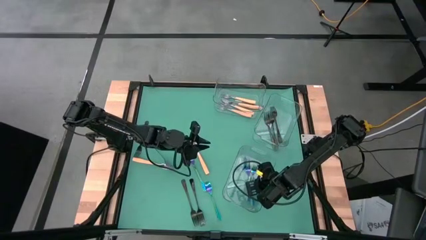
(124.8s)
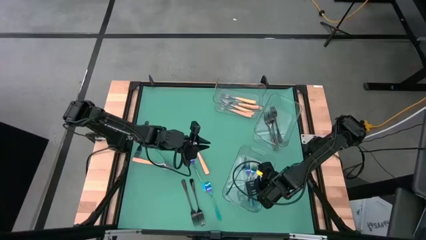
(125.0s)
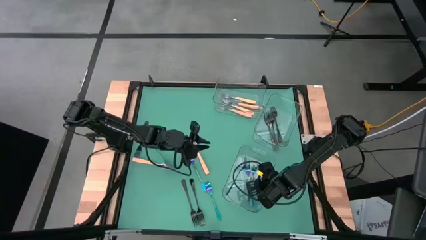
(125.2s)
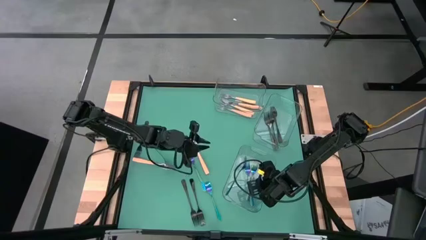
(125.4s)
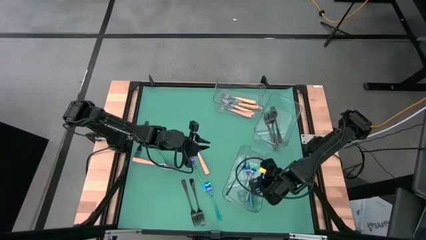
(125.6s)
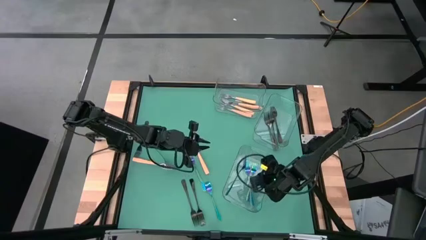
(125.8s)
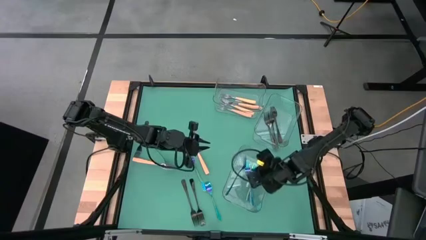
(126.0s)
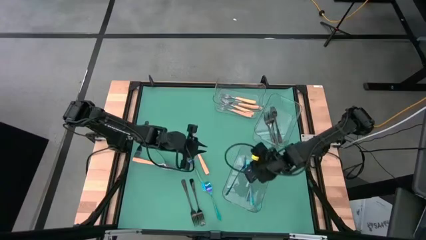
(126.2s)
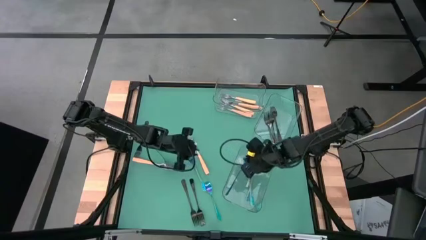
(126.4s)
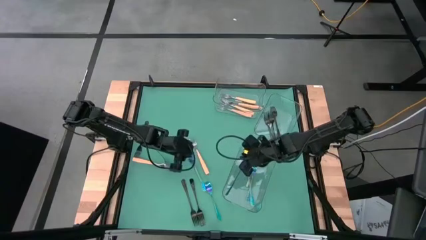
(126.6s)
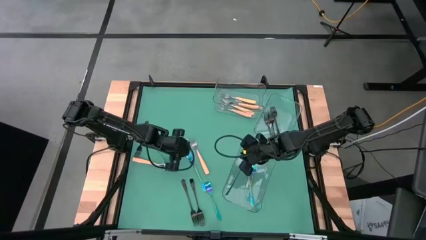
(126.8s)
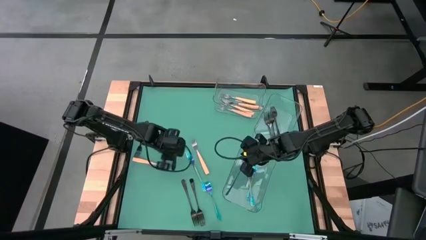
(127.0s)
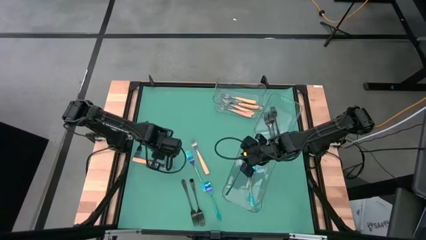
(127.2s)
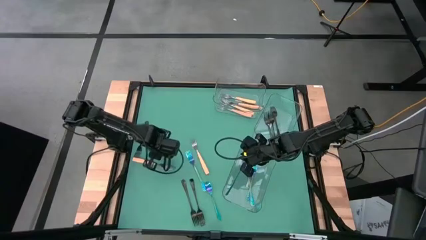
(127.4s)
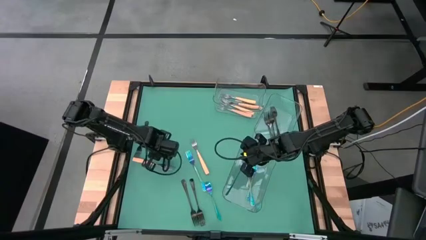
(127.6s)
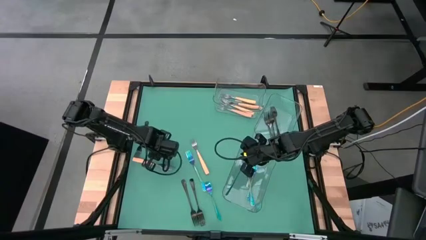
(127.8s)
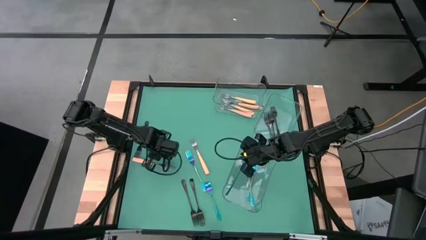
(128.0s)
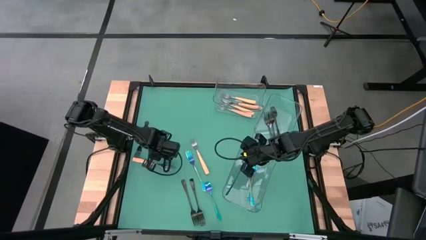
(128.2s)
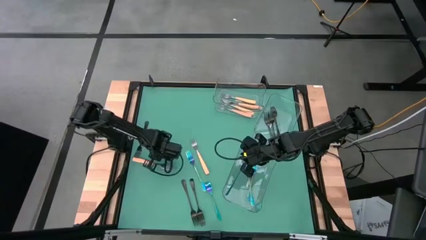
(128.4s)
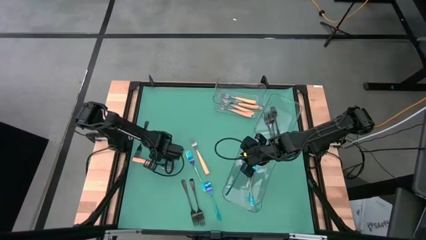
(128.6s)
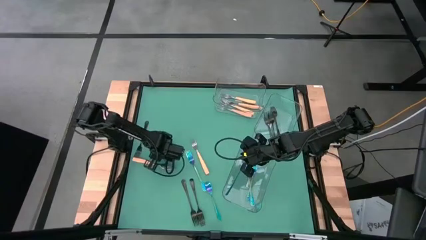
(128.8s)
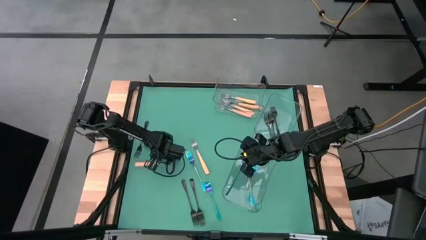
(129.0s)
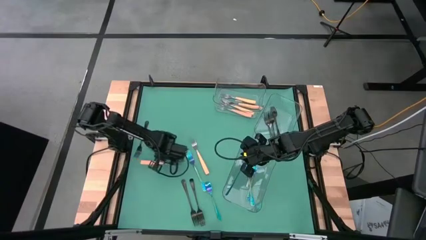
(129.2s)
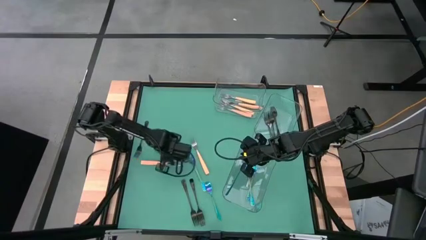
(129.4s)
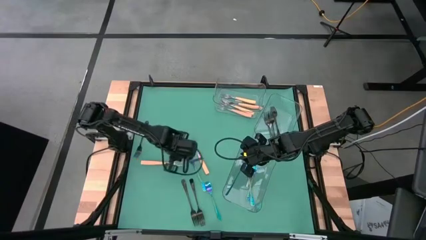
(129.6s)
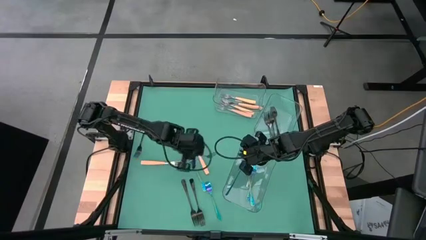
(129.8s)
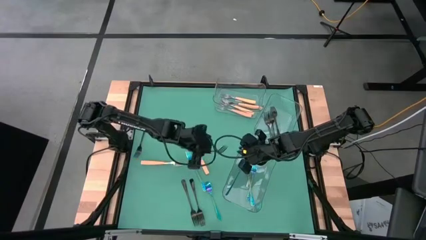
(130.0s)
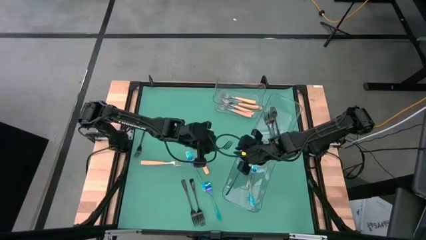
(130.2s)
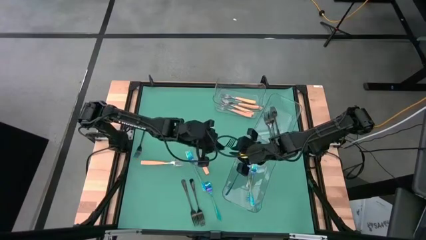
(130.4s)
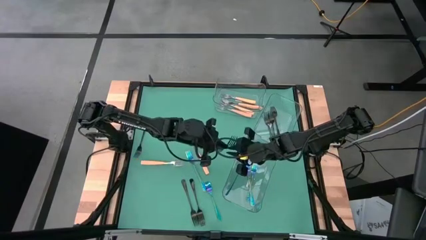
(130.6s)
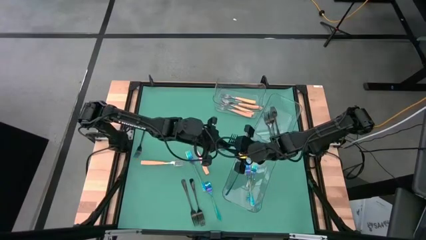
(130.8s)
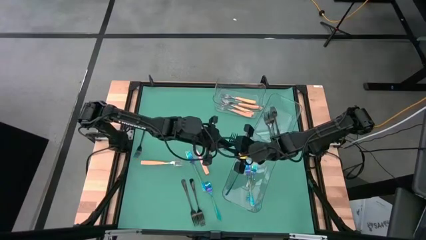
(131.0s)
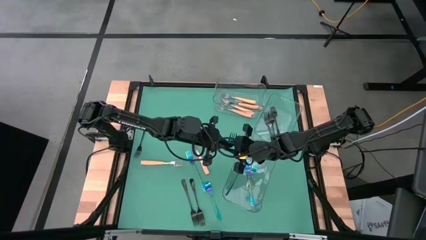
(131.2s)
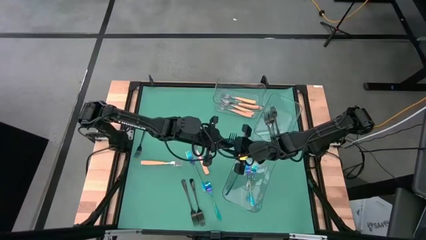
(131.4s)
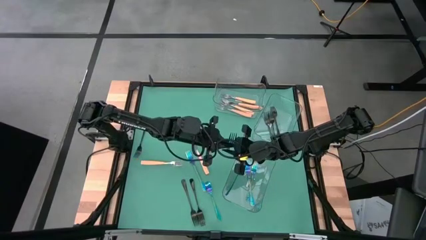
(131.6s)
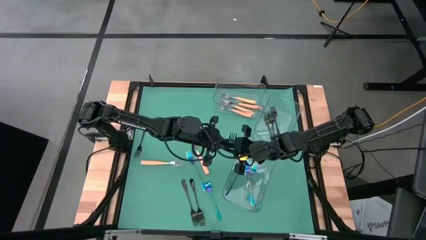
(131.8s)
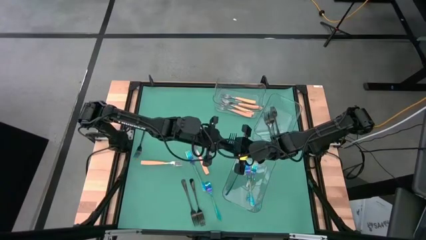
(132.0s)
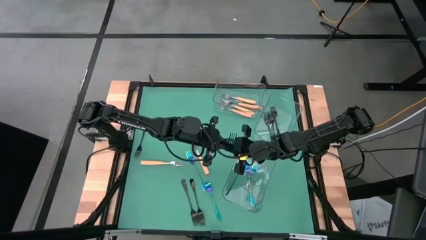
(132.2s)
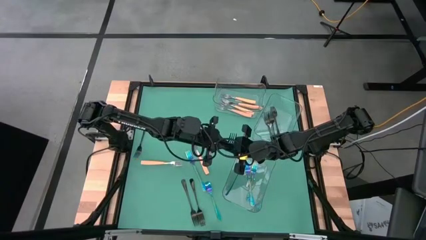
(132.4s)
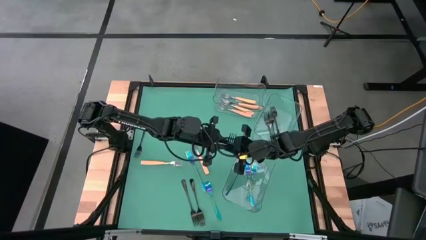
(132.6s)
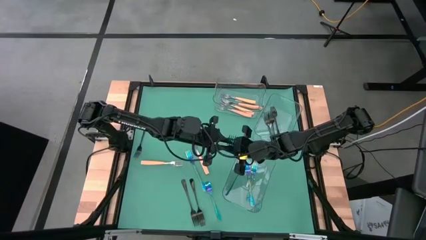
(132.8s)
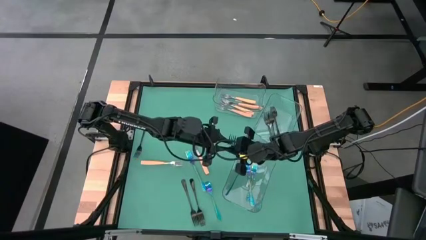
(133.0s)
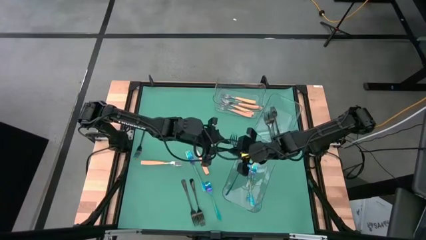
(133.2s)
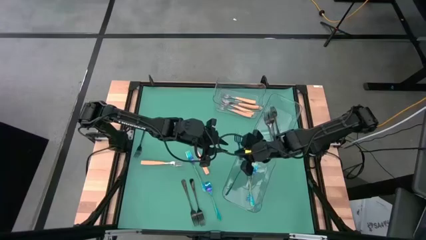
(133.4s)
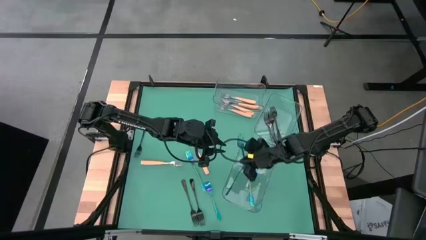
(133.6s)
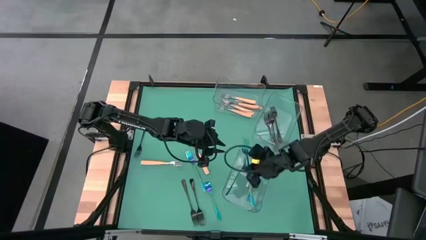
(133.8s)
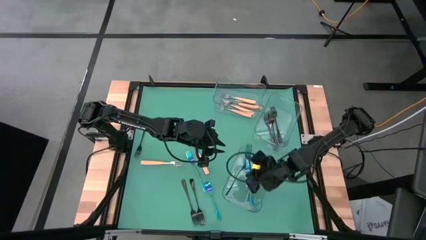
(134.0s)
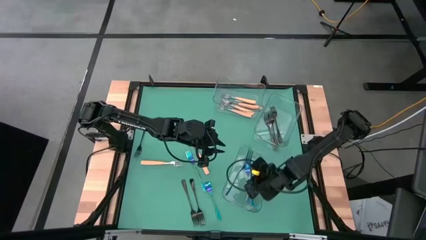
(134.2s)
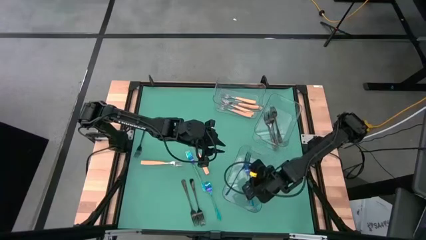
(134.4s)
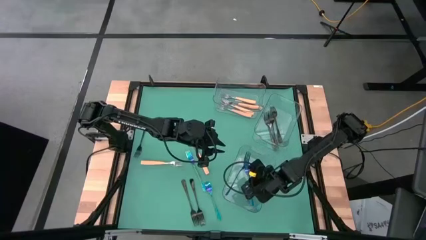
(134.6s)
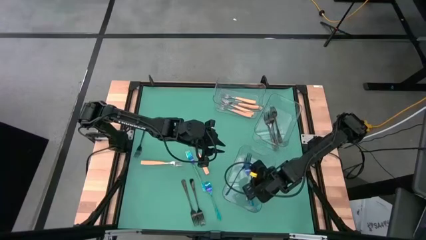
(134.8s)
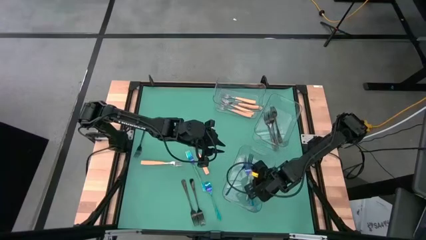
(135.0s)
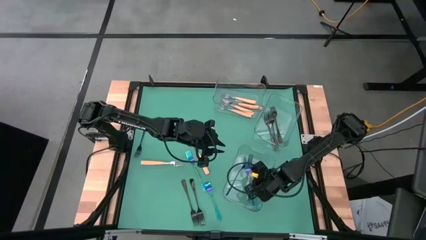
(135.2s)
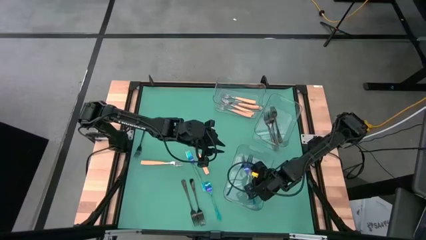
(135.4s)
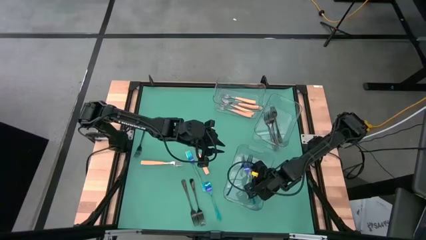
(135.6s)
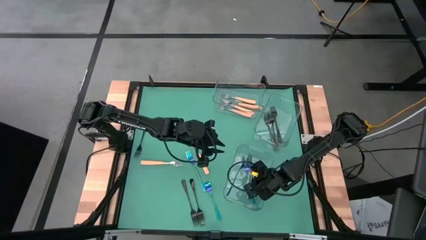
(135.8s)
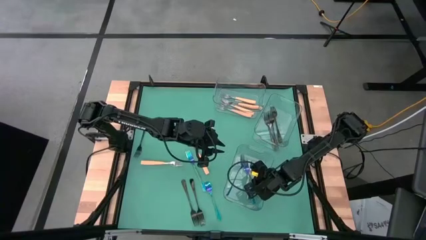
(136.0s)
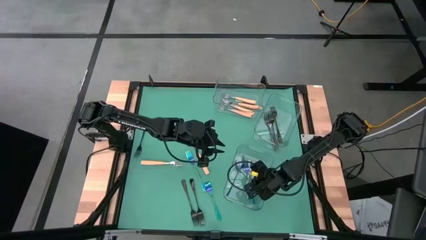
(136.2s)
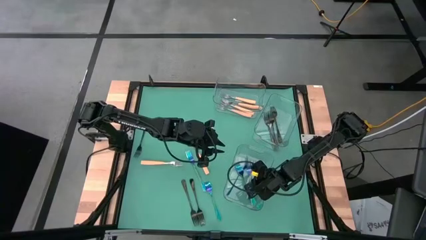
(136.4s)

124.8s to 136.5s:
Task: Sort silverware by color (type)
Put the blue fork into the bottom transparent bin

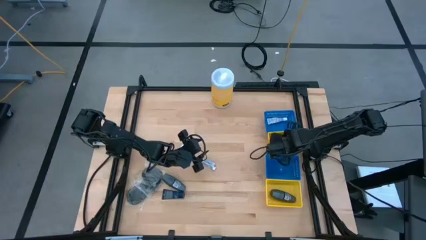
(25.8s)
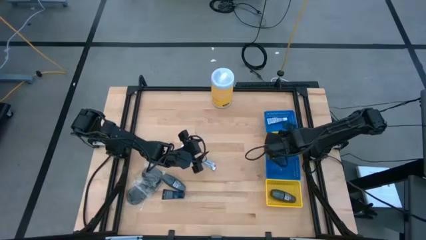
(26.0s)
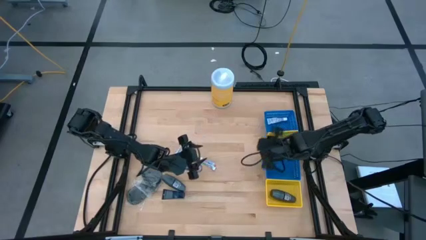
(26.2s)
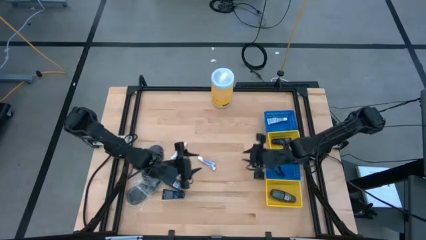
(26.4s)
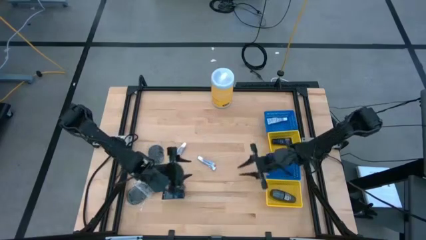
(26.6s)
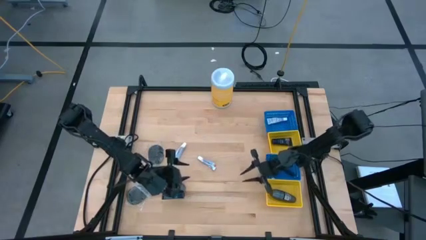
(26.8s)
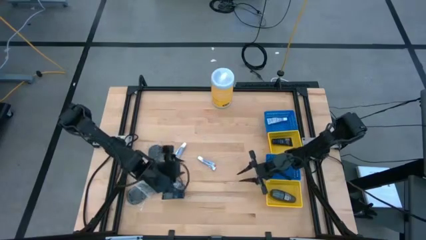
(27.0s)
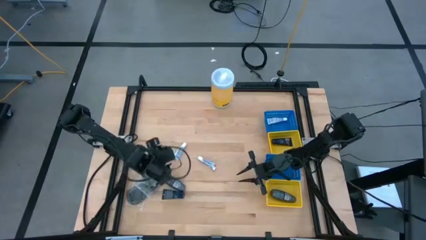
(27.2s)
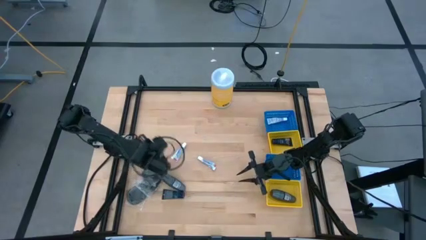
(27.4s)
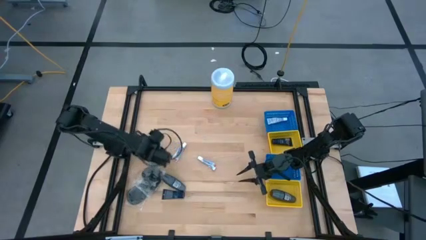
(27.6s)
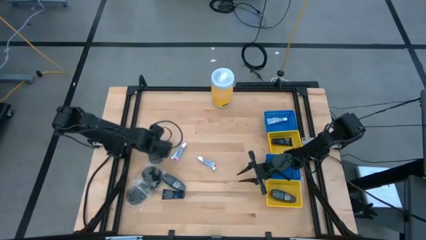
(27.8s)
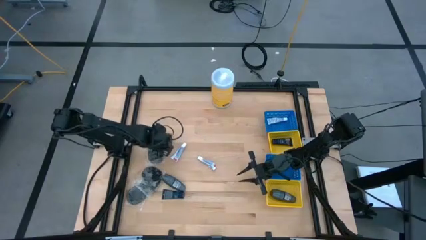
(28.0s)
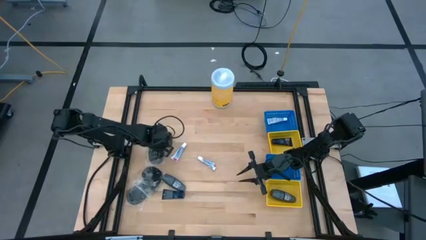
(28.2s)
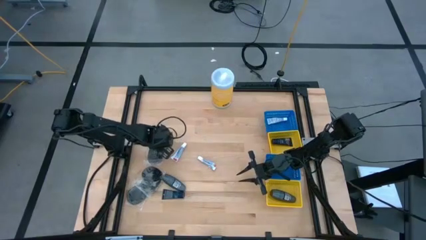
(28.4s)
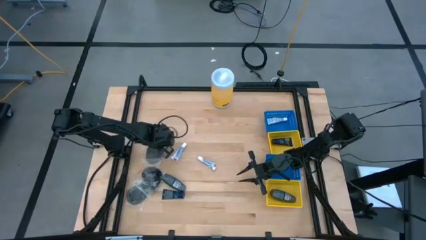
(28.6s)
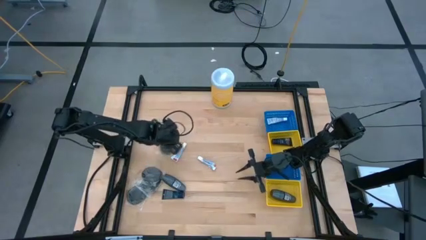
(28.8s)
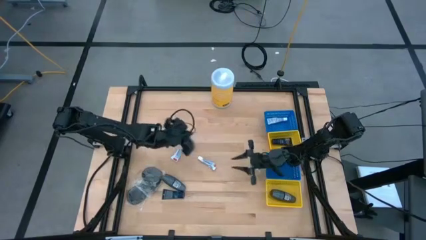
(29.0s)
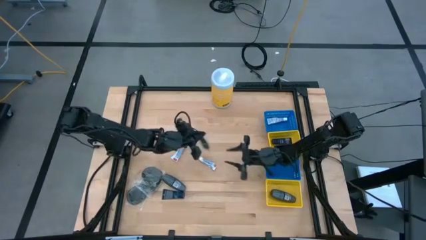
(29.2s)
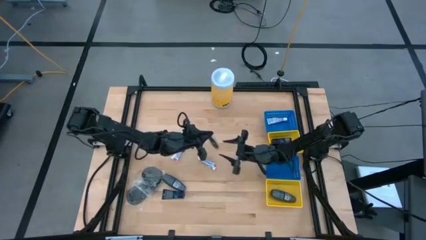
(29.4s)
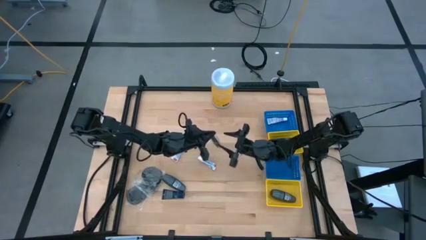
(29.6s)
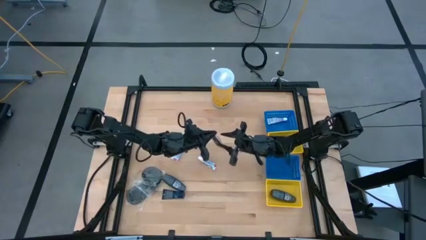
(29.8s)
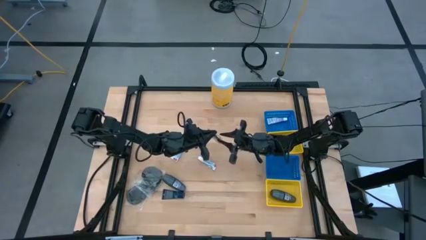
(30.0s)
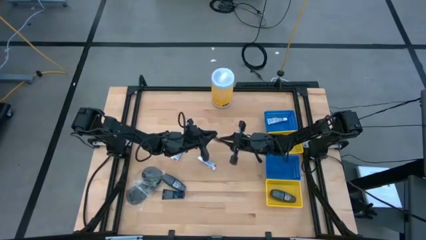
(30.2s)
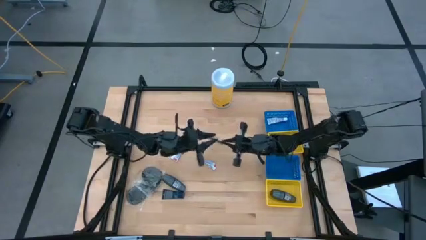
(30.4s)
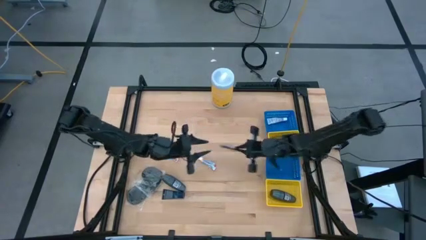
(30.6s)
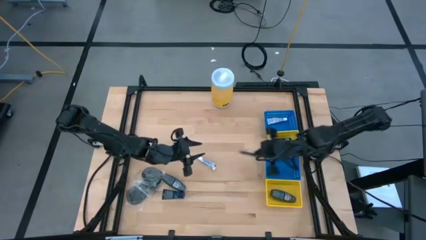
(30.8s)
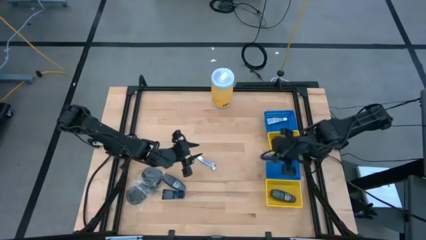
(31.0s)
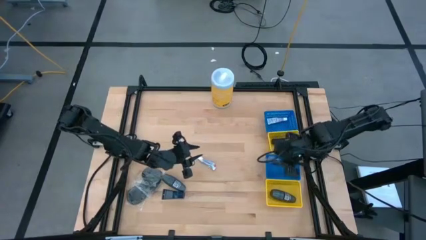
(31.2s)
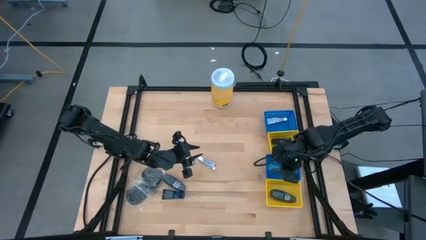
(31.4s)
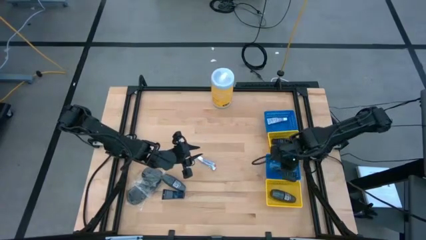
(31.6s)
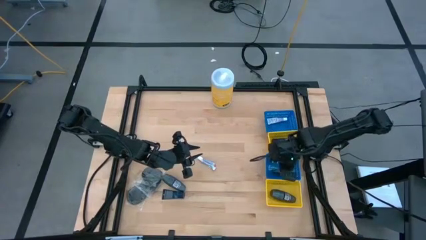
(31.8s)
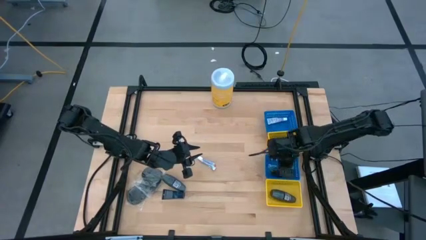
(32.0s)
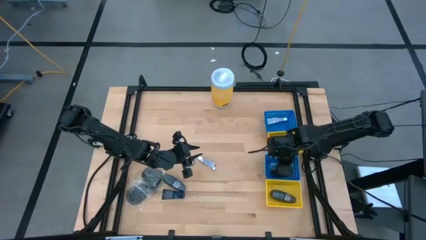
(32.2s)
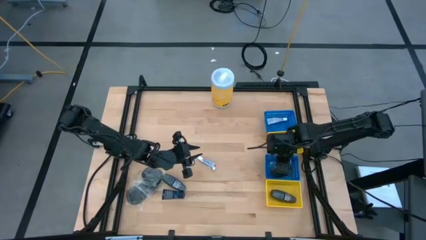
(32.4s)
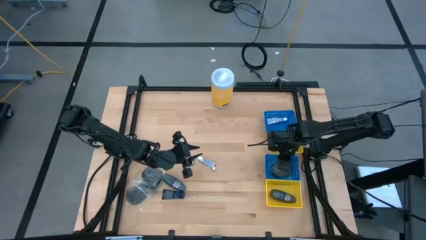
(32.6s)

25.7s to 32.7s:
Task: Pick & Place Travel size toiletries
Put the black hairbrush into the bottom blue bin
